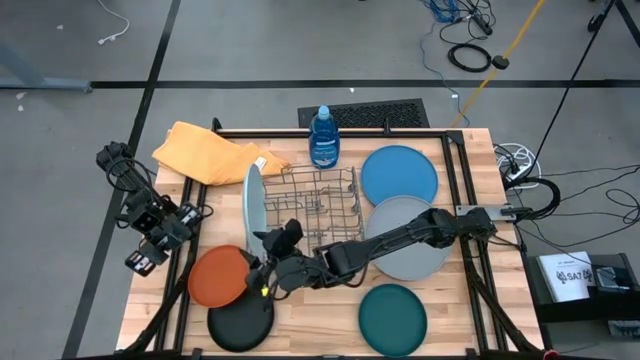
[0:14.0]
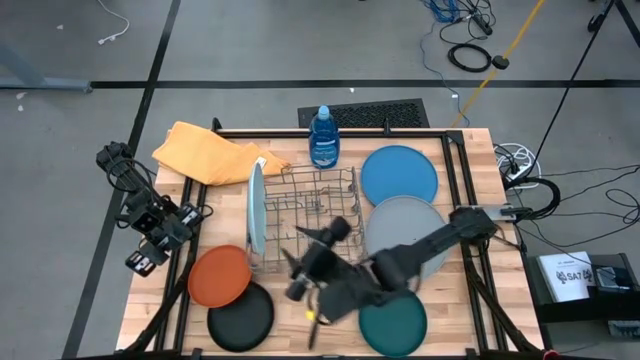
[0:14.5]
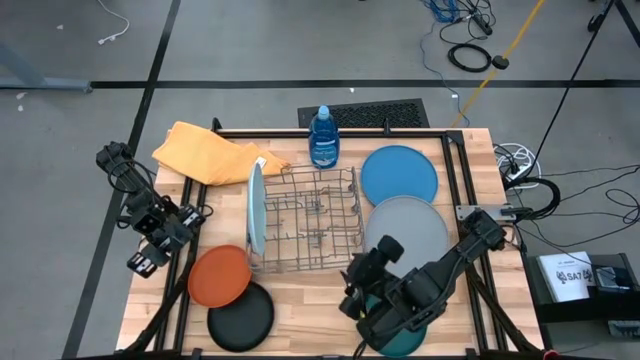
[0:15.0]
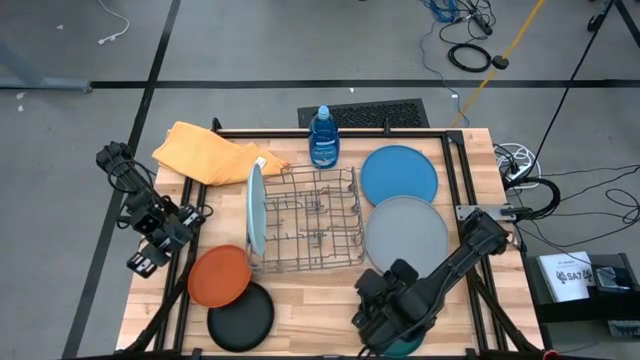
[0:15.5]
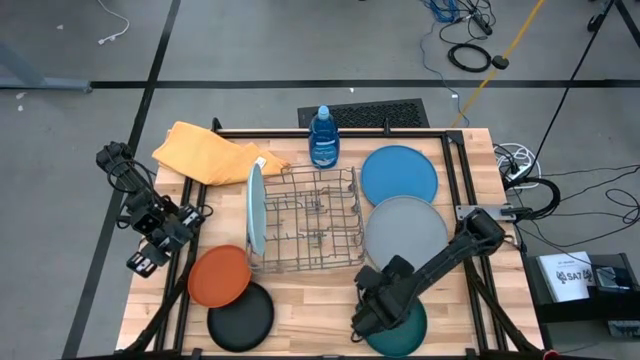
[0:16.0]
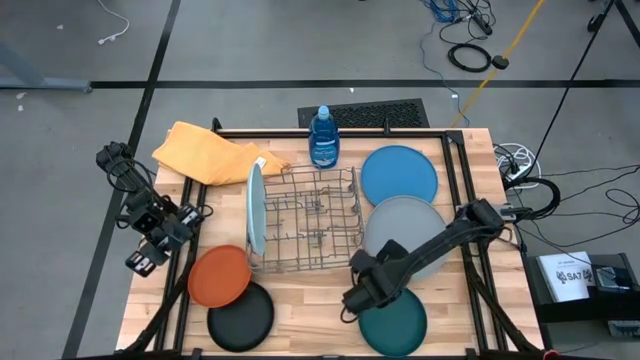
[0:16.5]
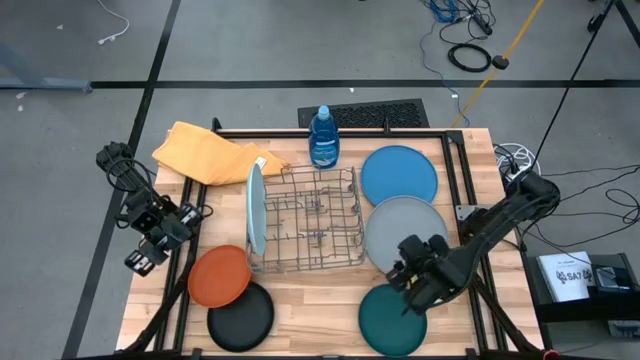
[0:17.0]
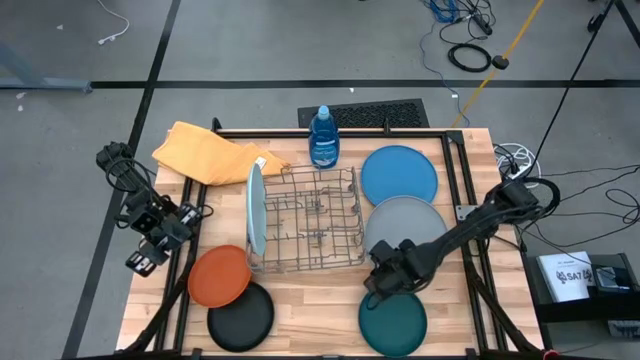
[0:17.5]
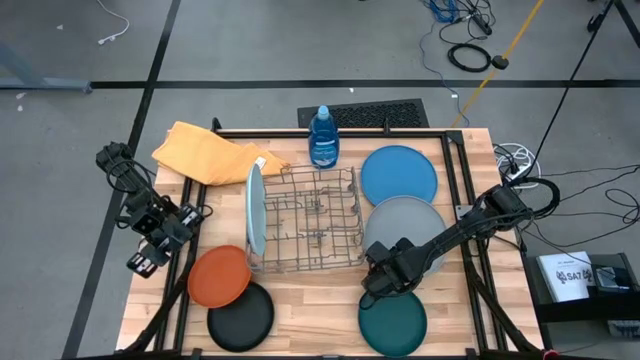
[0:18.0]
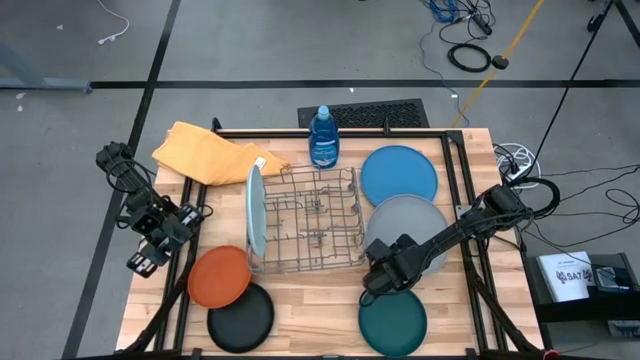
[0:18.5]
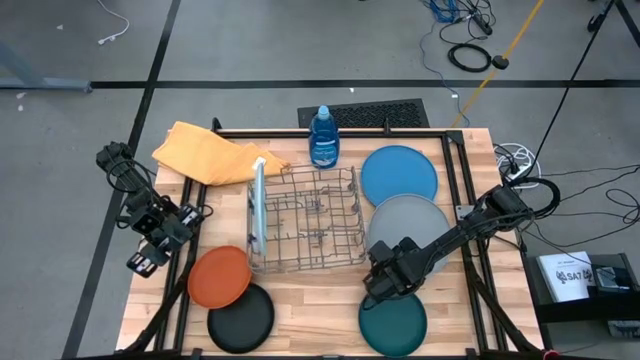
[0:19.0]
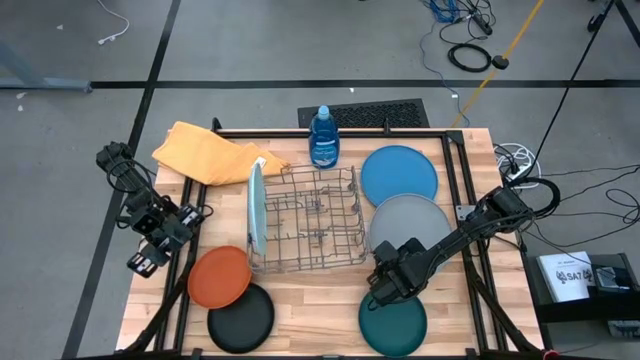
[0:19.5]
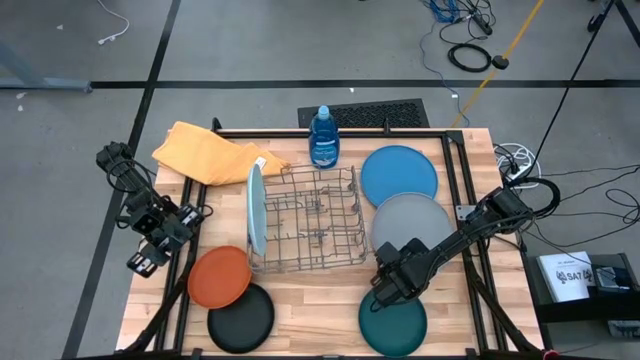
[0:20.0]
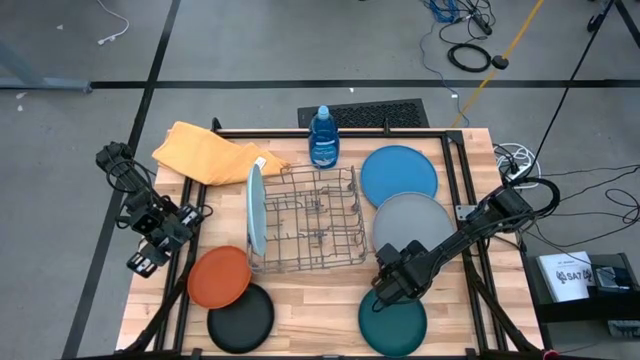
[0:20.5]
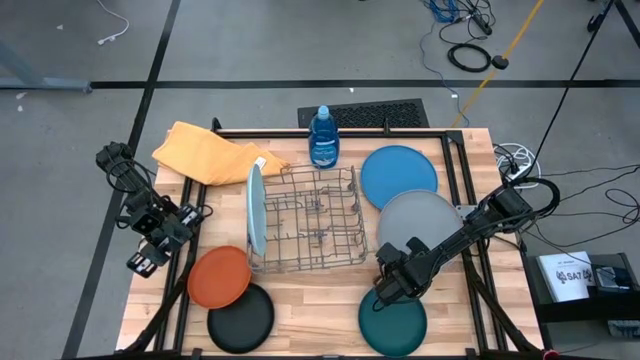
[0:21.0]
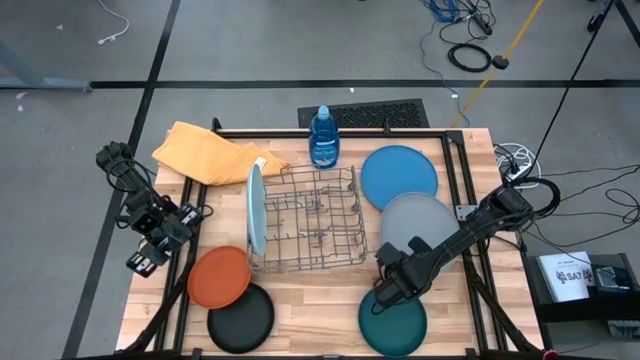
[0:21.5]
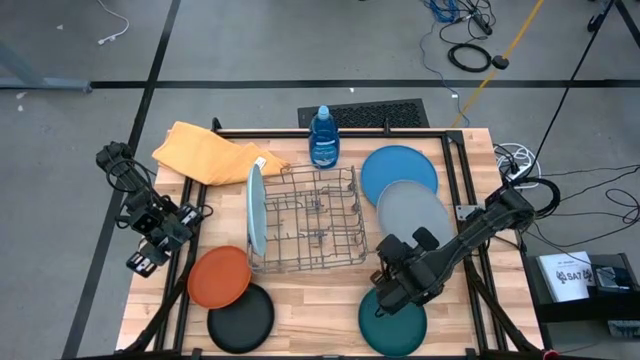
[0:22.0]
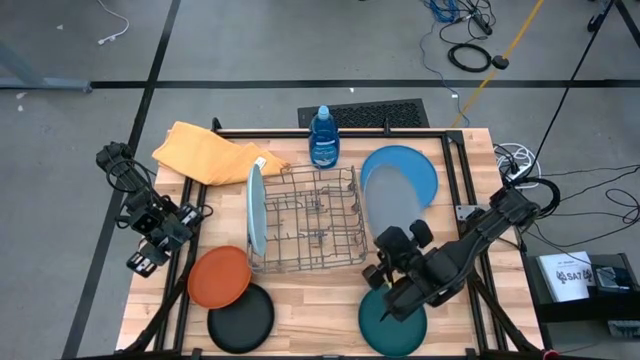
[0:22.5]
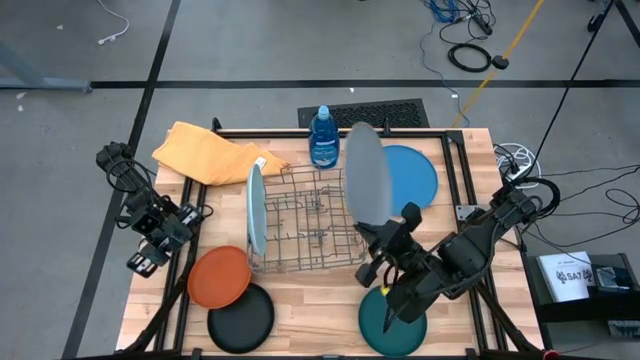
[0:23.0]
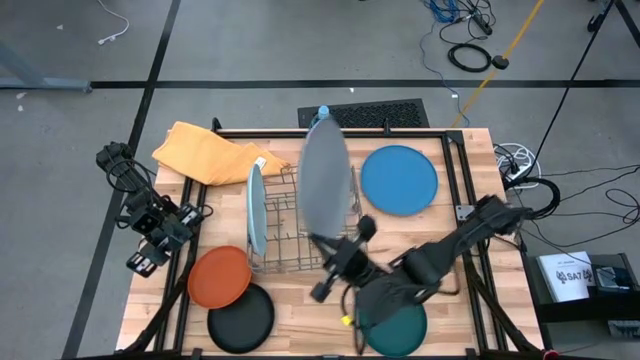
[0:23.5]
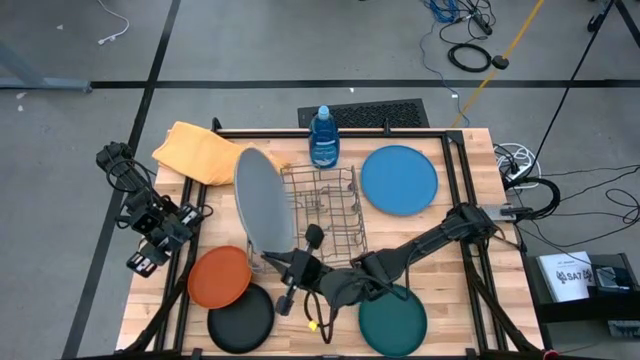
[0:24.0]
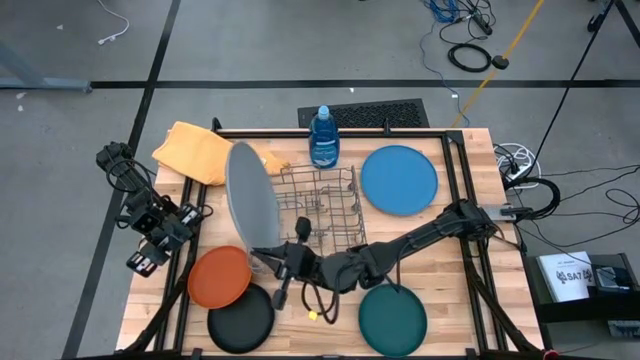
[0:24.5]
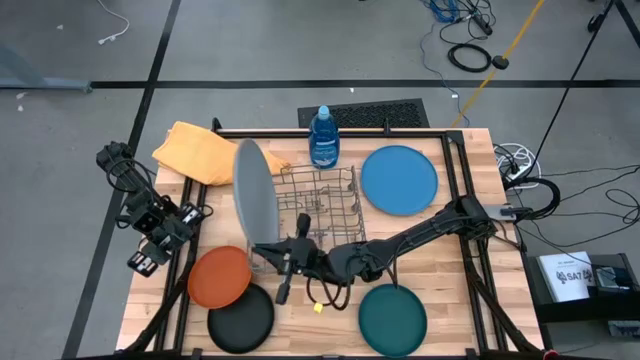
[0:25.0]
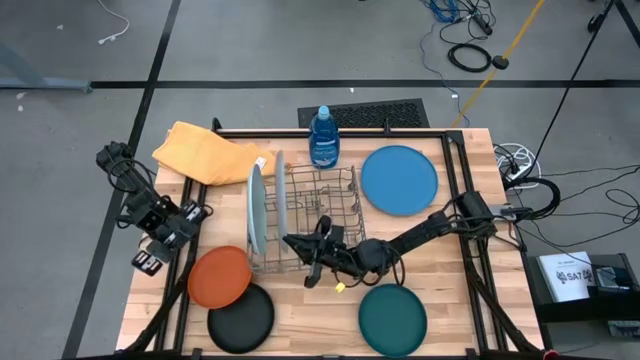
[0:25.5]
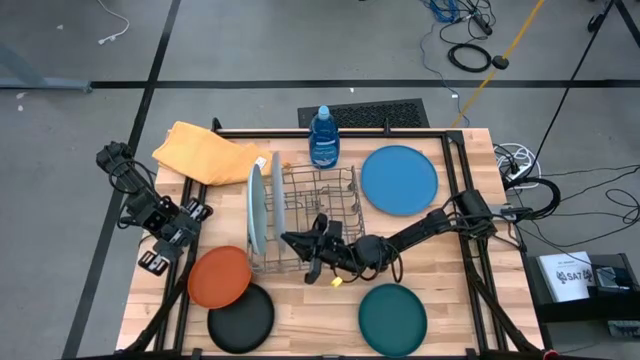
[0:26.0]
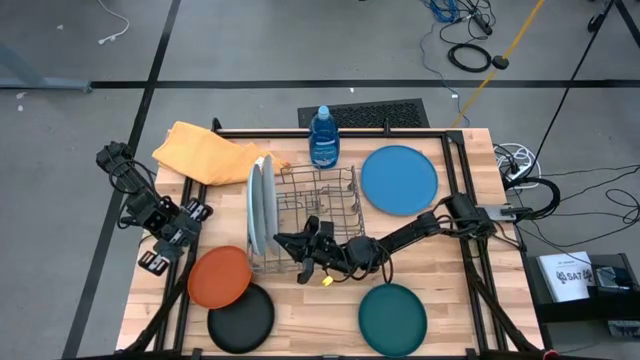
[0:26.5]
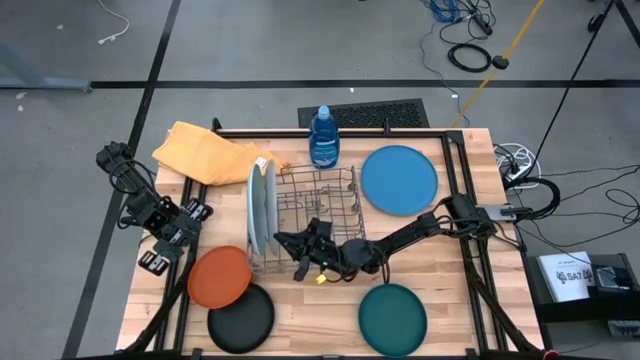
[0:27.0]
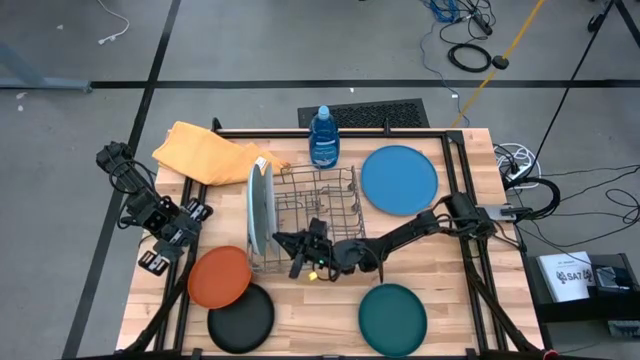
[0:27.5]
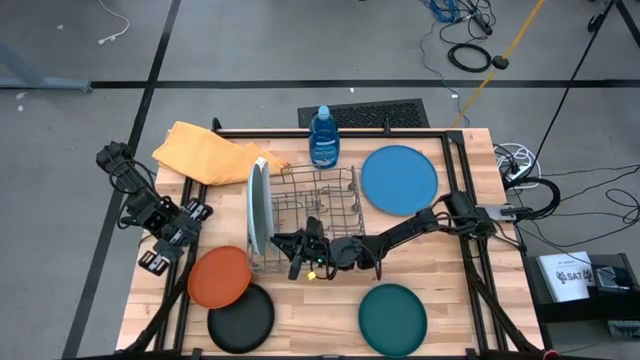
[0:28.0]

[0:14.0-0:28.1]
Task: Sort dishes
Put the gray plate in the dish rack

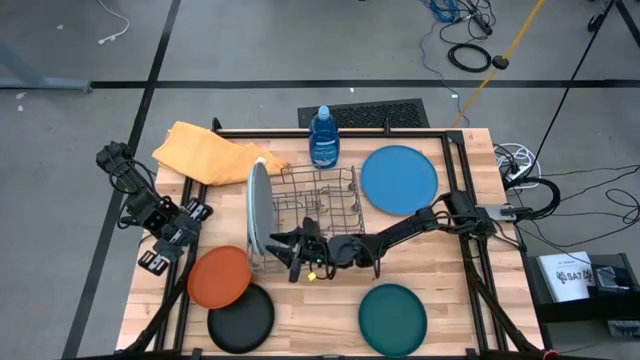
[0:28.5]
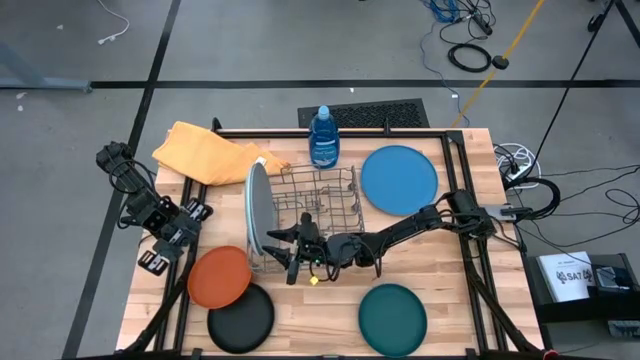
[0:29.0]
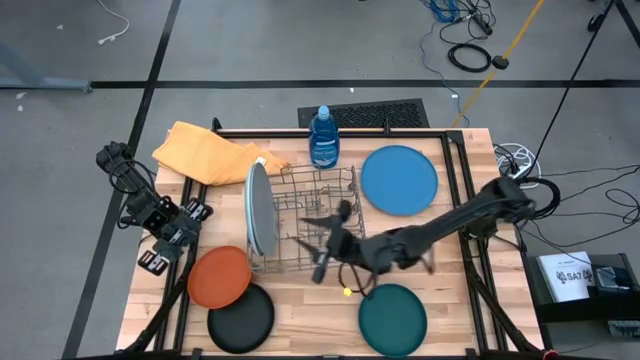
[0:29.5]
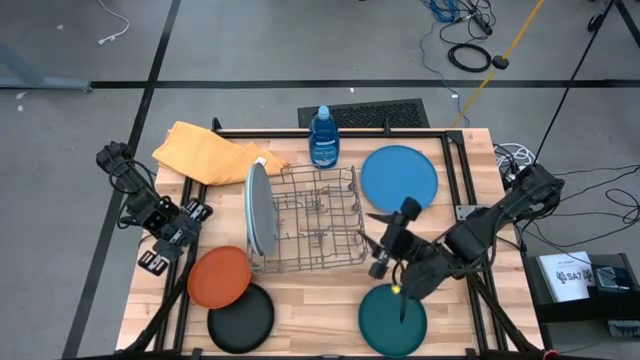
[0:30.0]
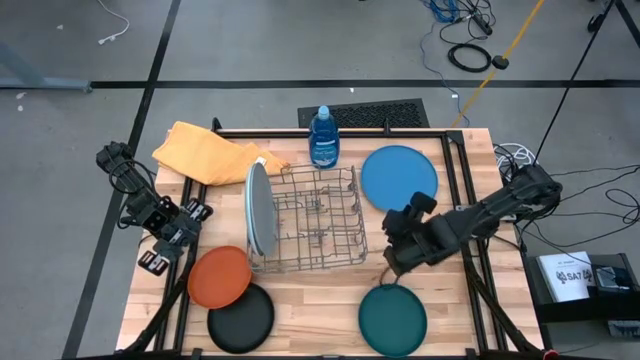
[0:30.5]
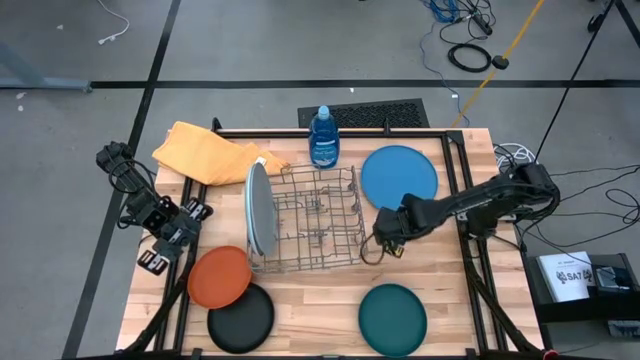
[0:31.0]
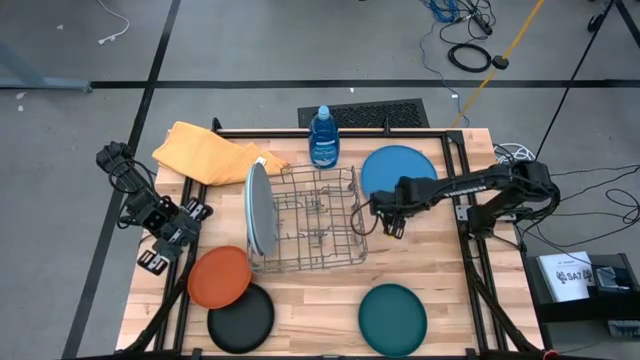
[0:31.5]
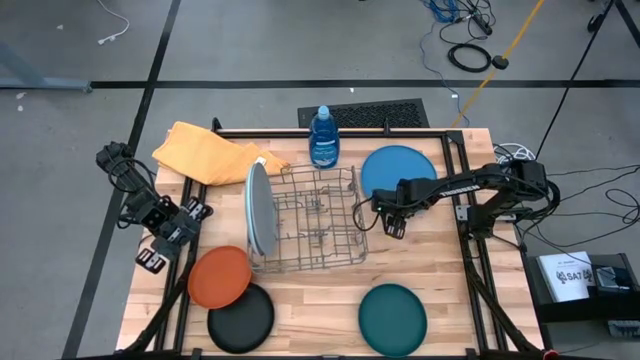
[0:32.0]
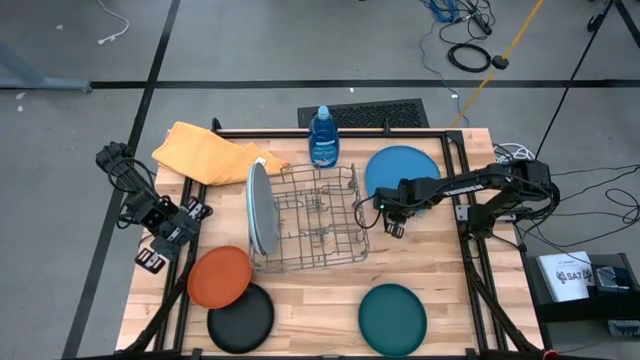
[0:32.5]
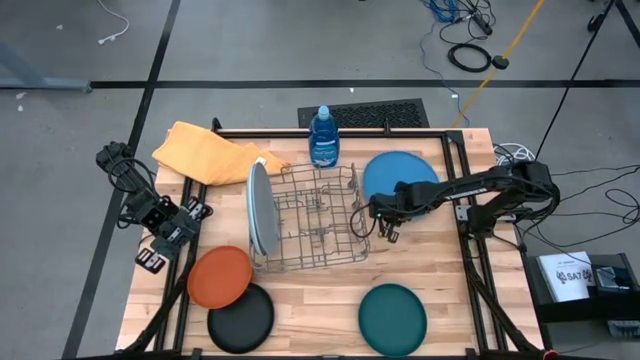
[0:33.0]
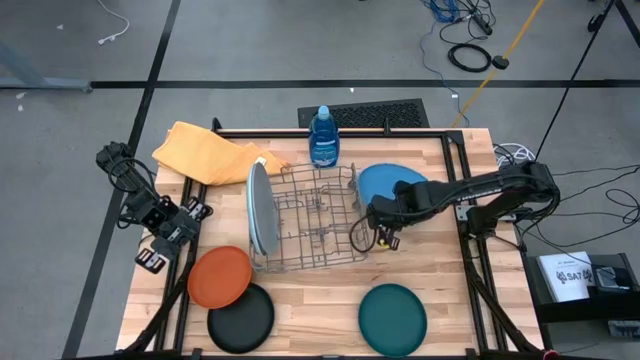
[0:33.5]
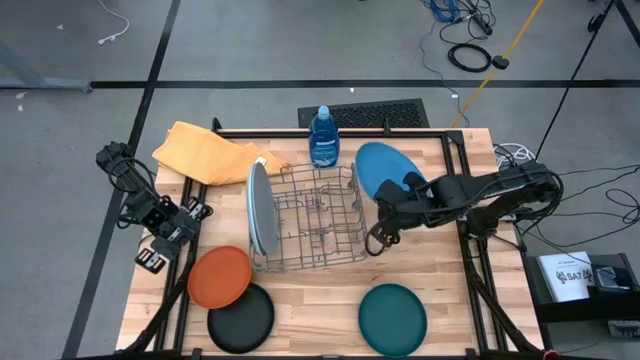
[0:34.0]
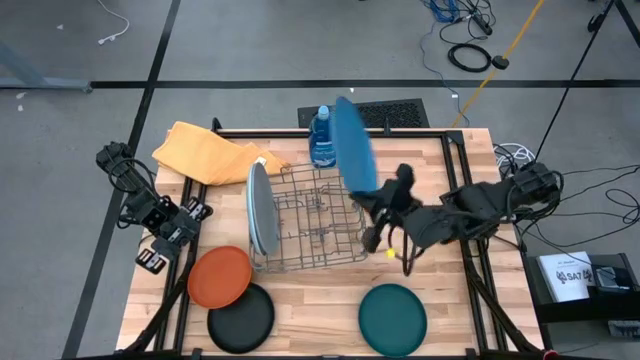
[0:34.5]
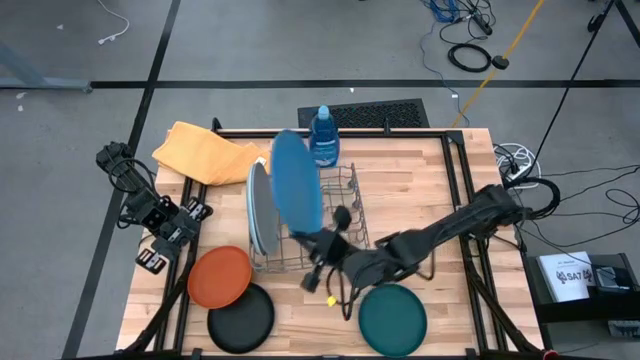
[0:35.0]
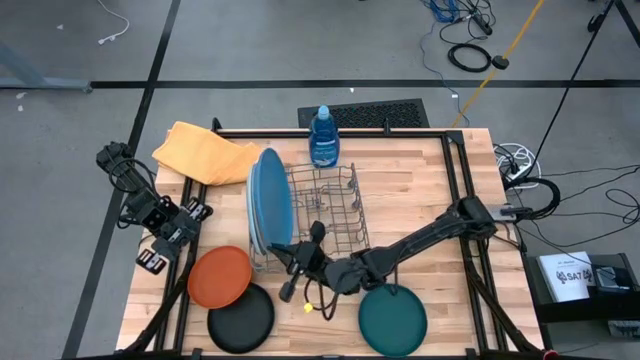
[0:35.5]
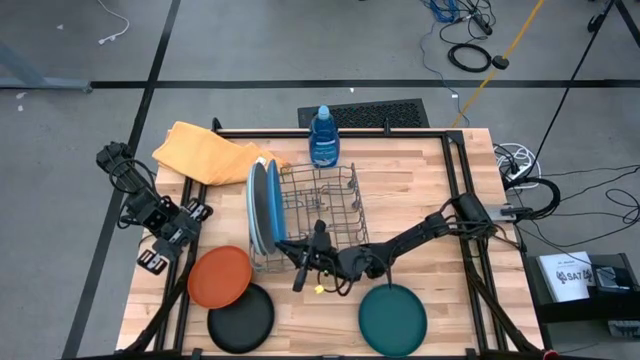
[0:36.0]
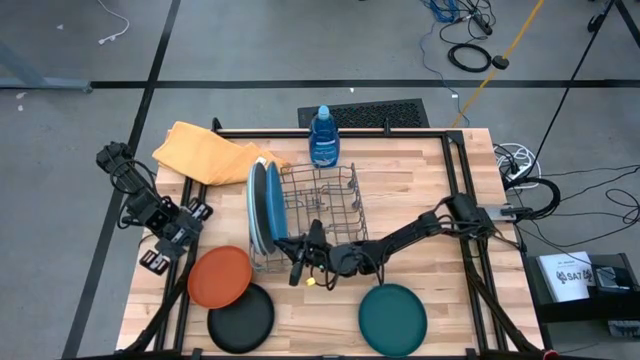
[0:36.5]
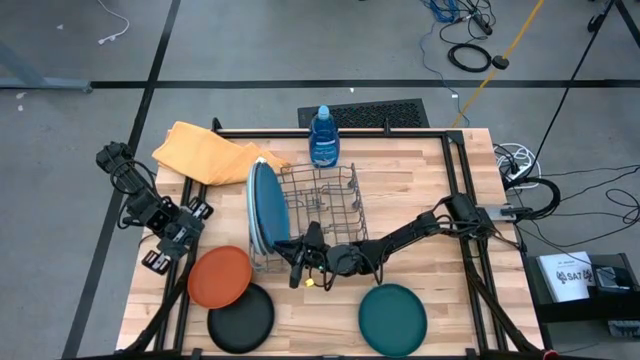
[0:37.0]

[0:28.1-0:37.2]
Put the blue plate in the dish rack
